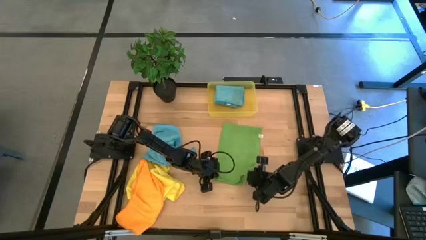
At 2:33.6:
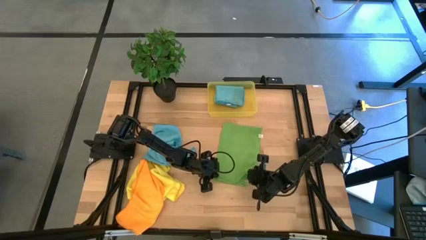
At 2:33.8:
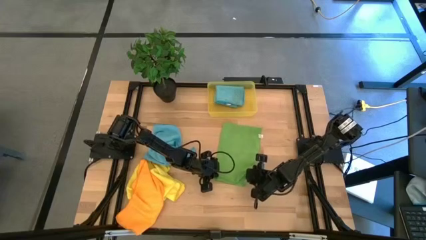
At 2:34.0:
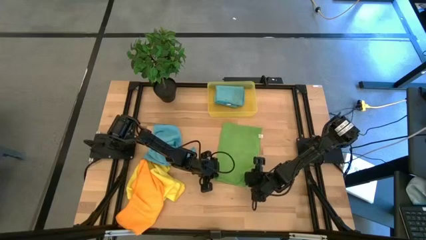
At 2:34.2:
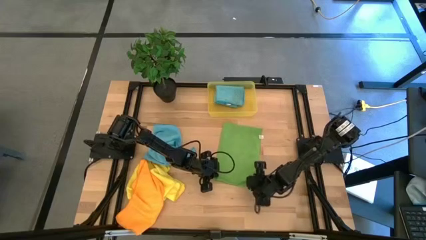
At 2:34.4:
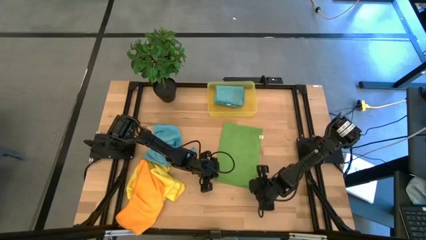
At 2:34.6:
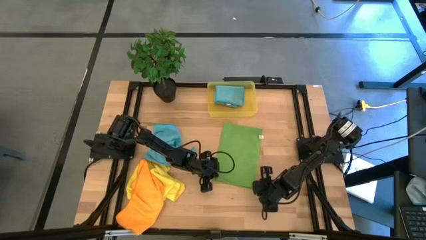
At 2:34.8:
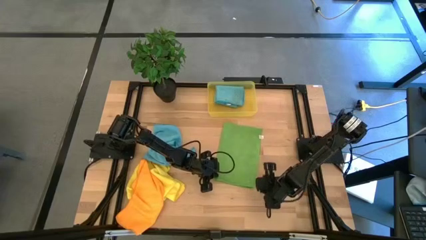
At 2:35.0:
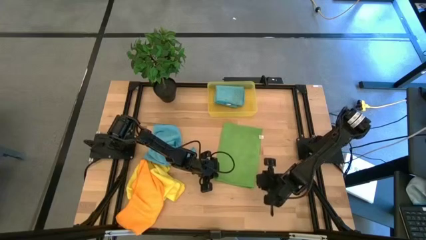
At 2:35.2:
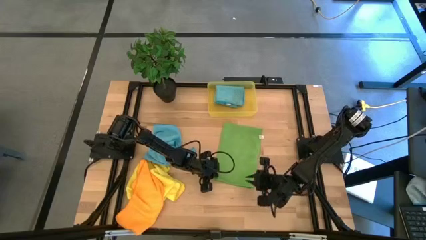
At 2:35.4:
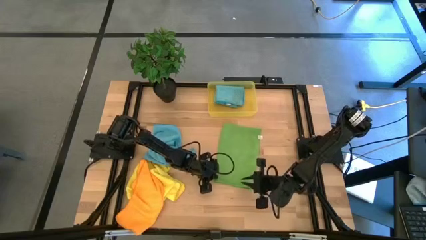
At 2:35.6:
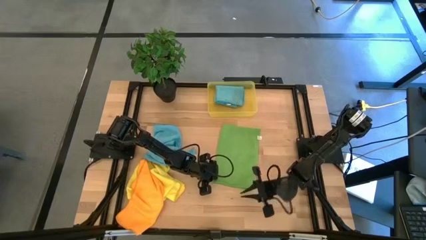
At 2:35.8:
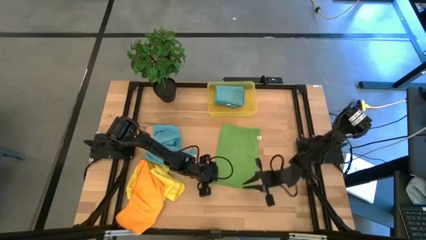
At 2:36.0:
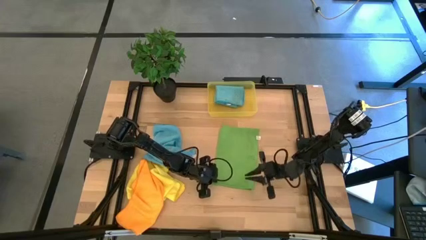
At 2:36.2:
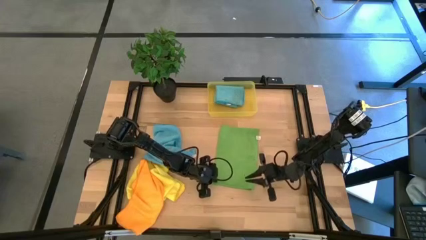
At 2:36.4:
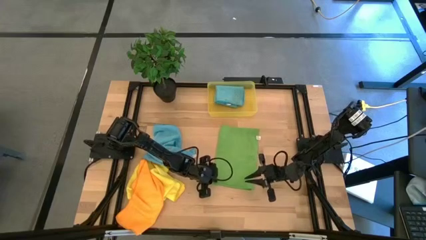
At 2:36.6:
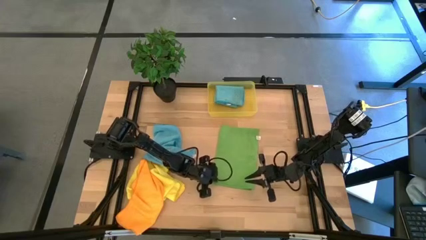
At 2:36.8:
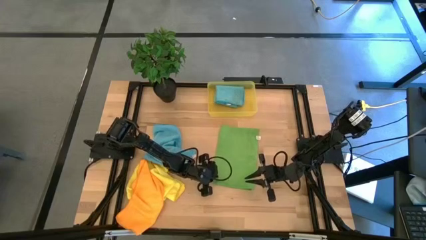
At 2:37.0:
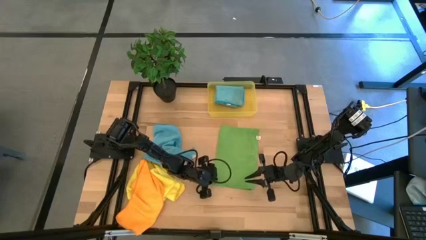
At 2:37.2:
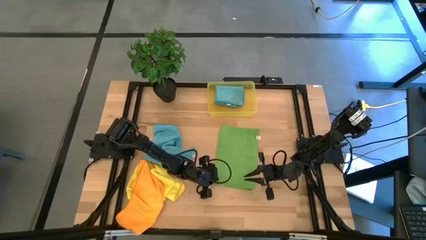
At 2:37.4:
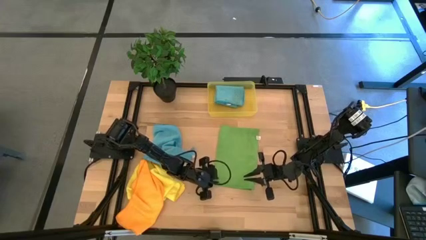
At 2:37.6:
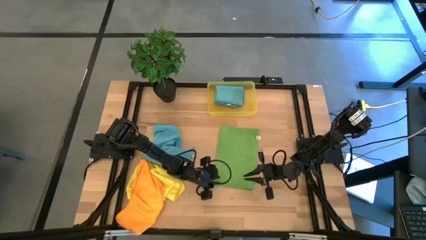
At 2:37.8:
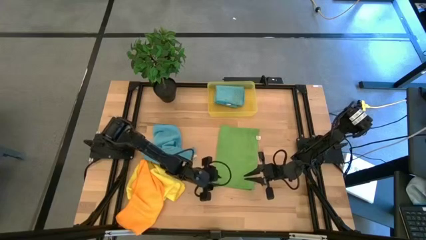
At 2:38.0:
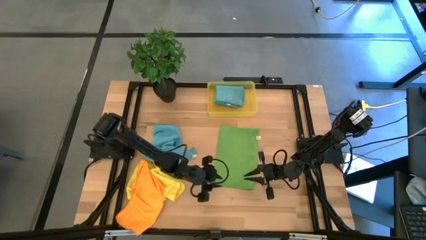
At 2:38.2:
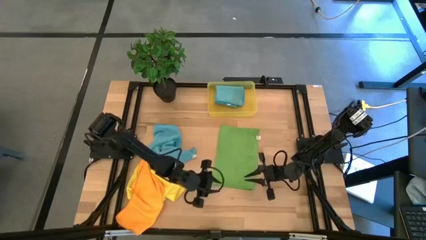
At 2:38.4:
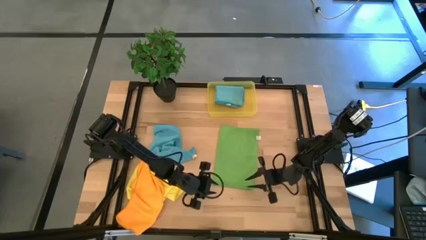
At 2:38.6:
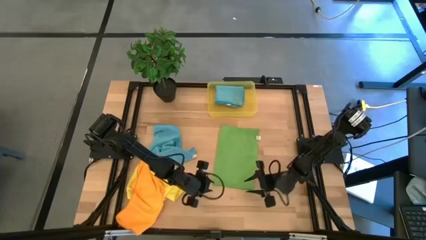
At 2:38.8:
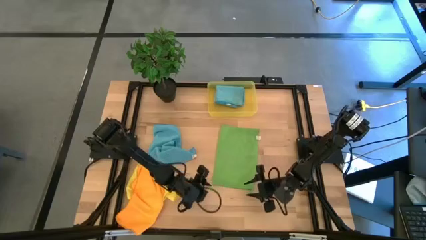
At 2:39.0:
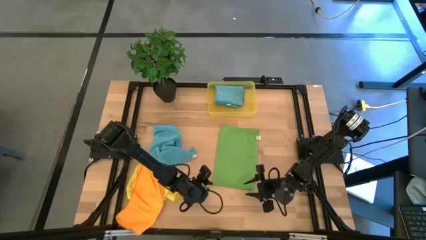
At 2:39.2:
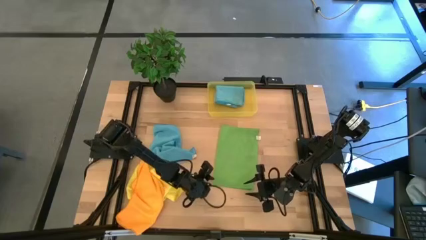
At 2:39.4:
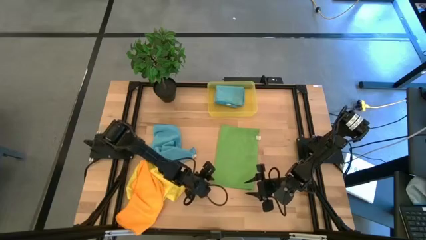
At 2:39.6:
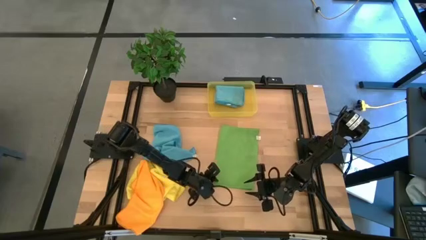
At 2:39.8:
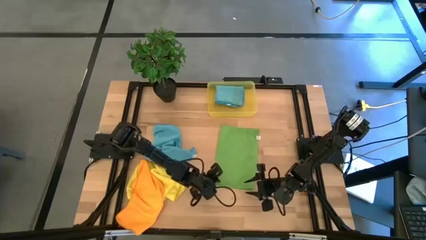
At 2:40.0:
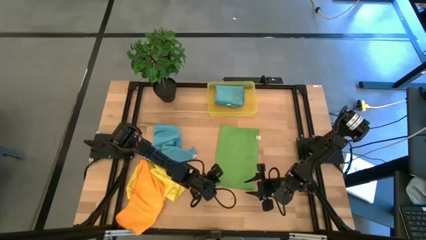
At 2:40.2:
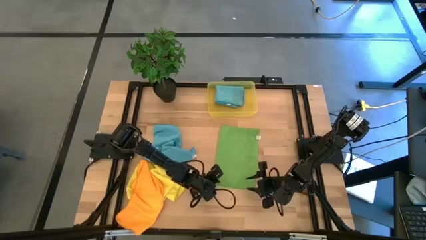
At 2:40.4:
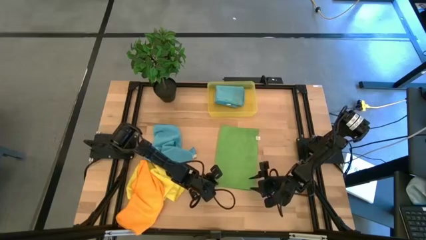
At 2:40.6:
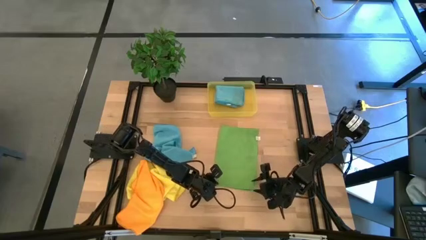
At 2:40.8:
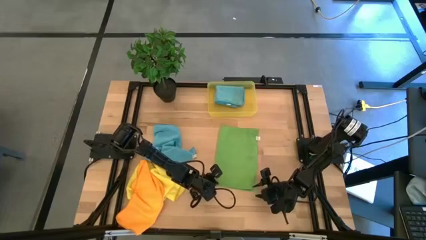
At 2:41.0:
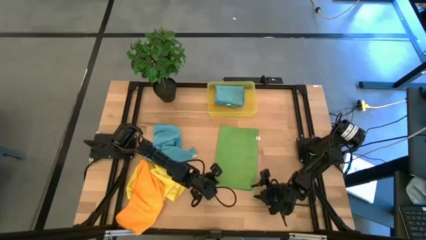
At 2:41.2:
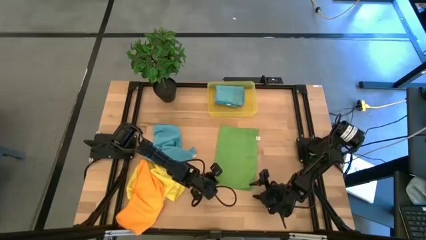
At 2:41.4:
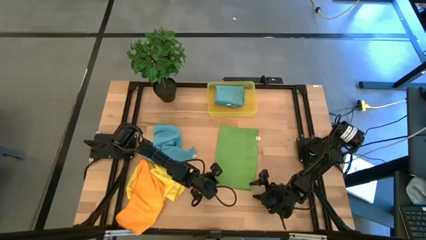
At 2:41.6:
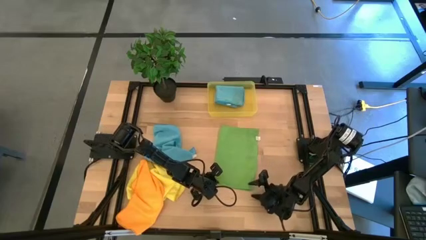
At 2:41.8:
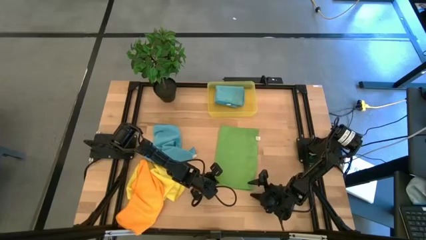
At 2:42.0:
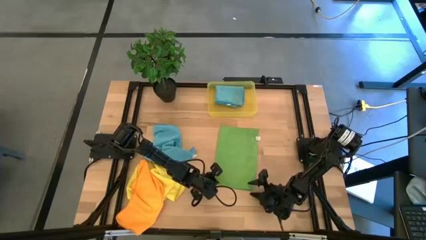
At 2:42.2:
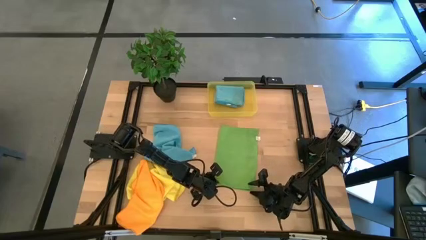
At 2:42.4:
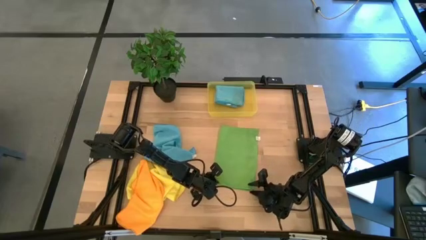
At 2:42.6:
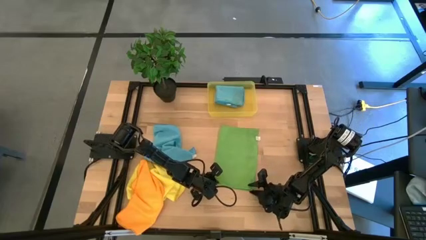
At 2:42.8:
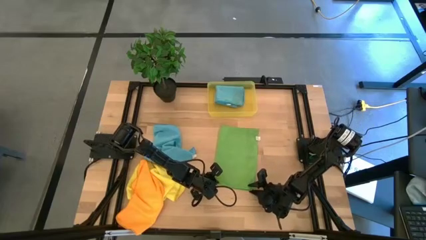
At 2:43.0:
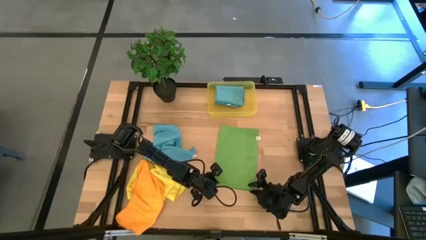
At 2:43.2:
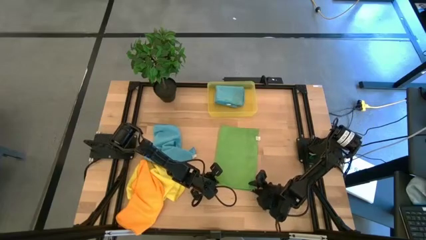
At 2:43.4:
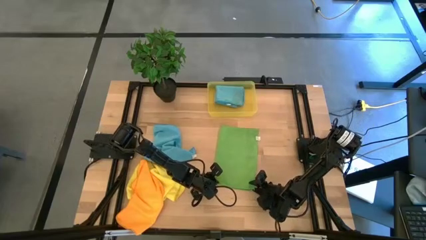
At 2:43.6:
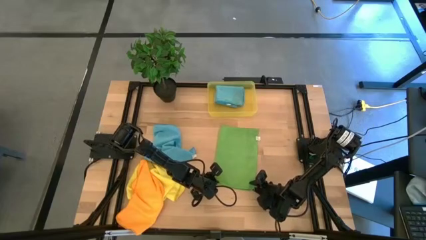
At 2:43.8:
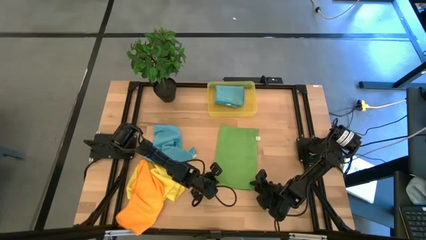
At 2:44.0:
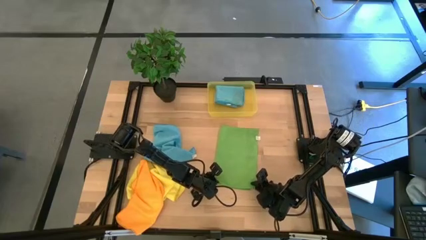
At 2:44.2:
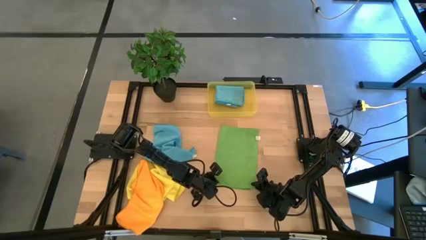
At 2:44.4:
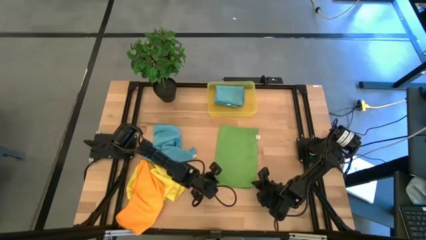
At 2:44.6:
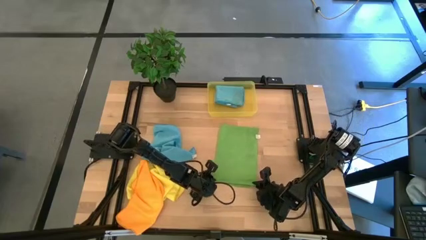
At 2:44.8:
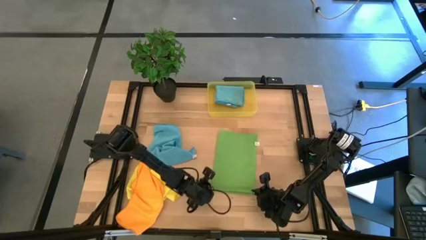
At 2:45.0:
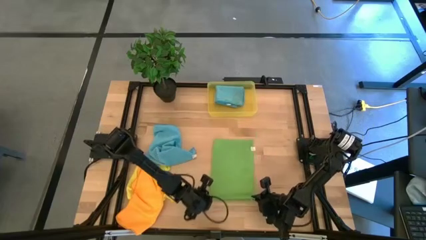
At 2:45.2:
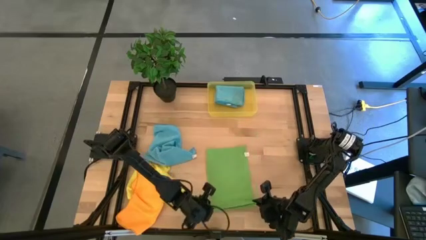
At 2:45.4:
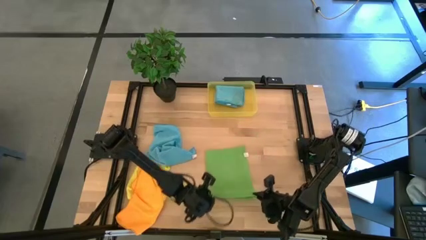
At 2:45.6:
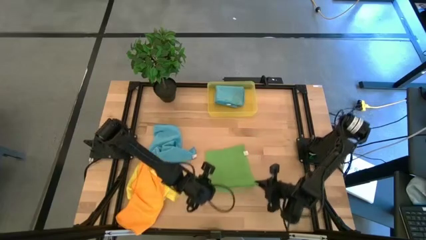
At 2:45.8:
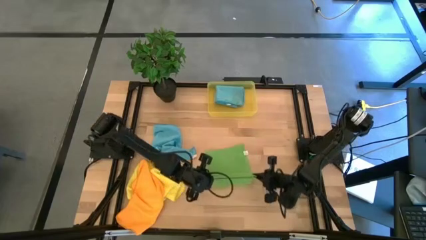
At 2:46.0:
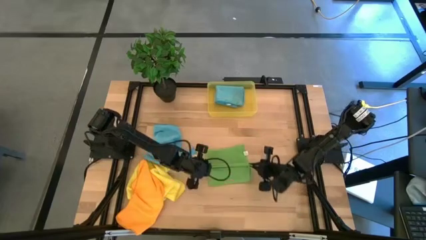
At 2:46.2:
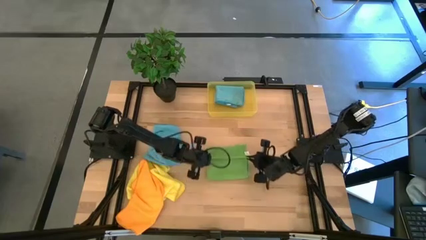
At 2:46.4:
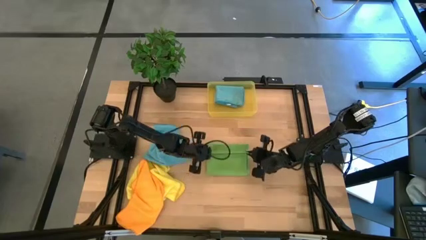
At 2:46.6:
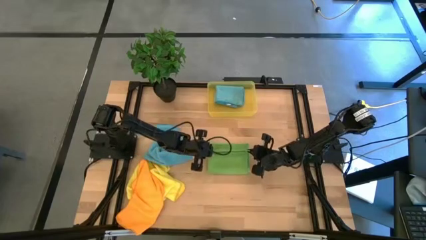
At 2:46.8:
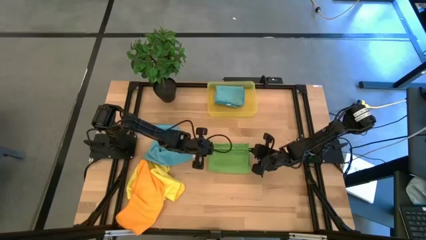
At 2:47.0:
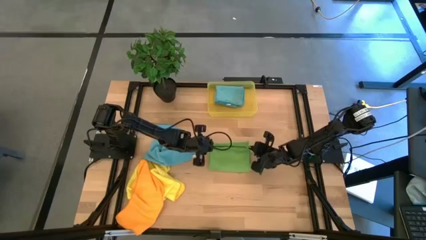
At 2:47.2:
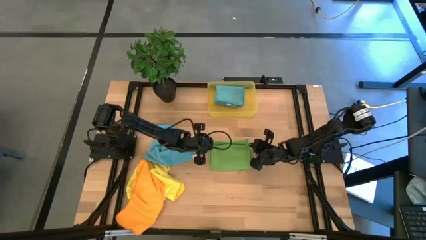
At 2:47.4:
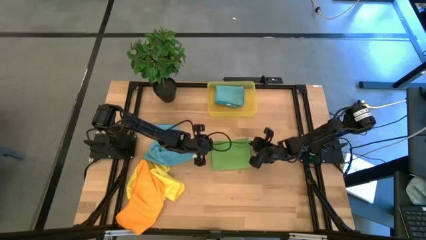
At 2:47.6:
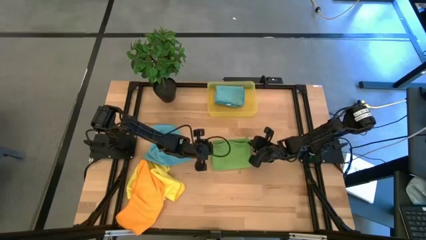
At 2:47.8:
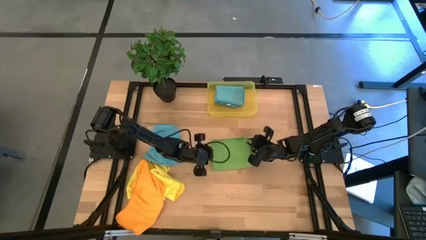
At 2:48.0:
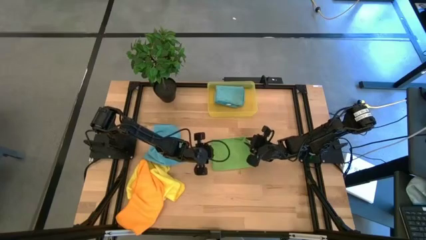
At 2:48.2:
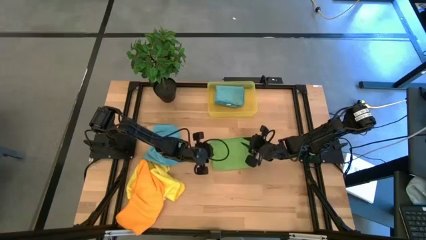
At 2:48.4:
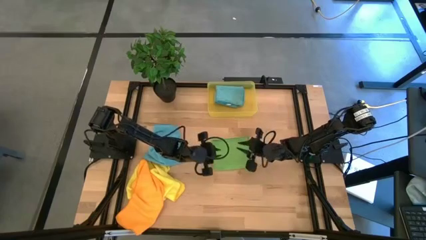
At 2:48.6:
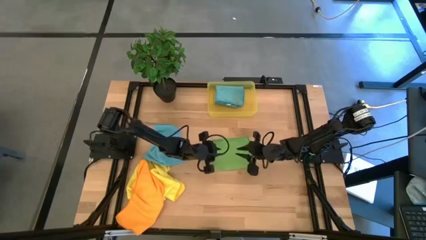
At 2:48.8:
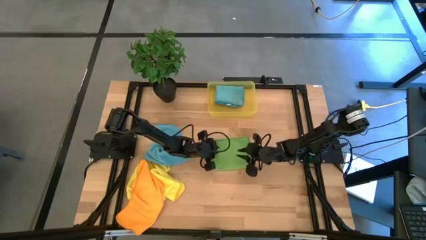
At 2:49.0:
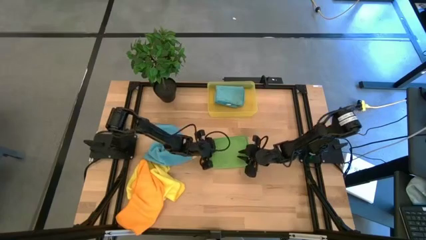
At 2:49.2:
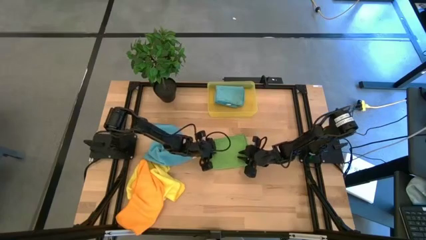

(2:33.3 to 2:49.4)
Task: Fold microfiber towels
Fold the green microfiber towel
